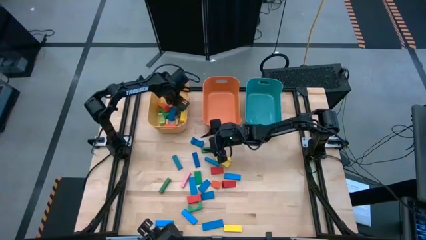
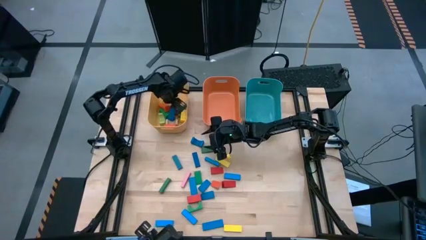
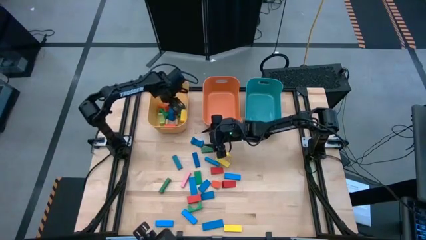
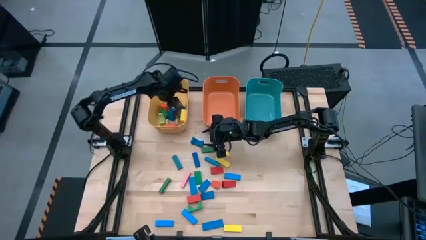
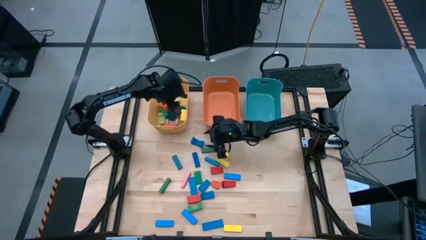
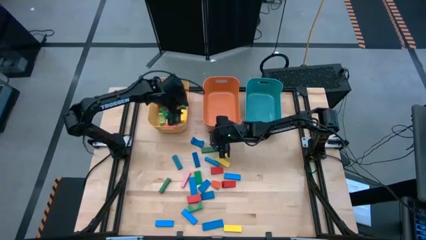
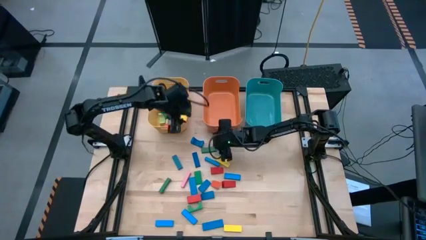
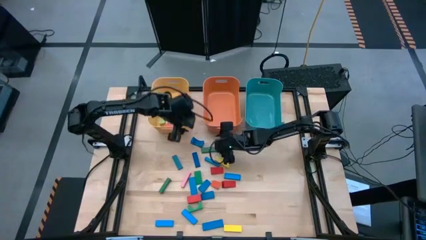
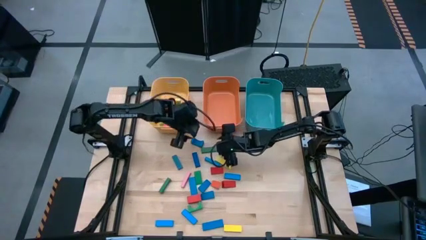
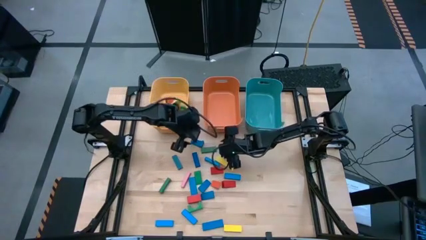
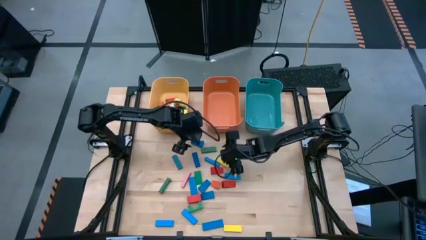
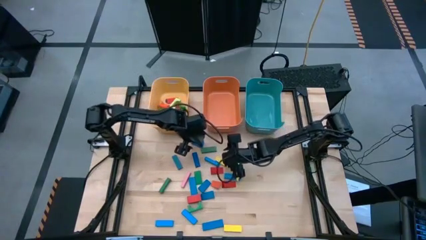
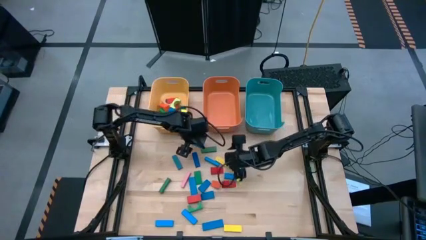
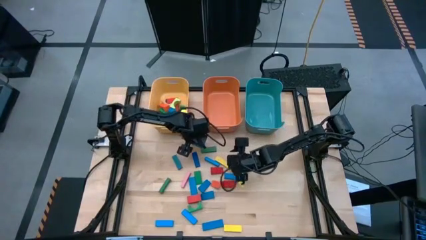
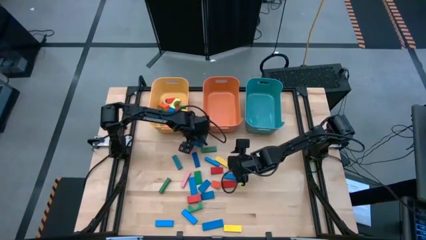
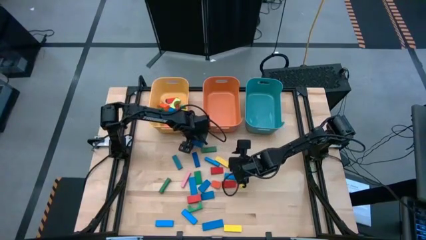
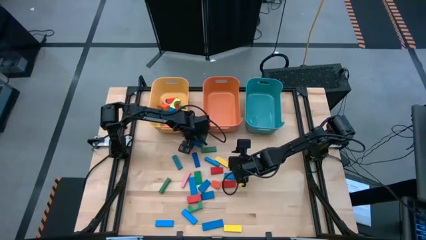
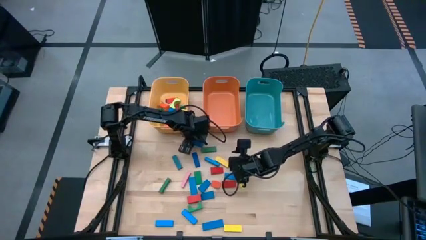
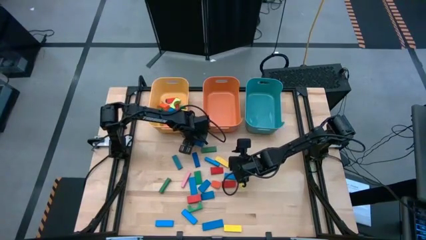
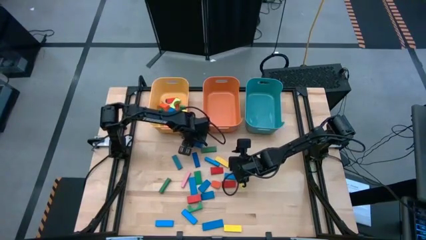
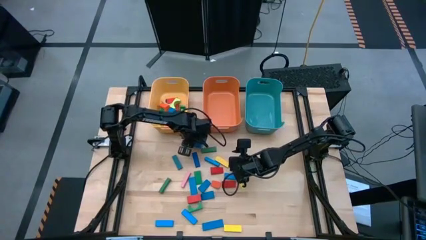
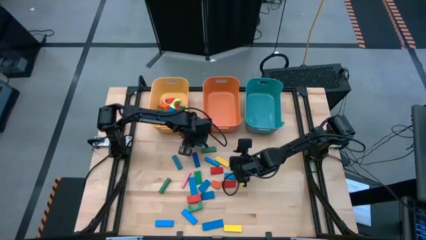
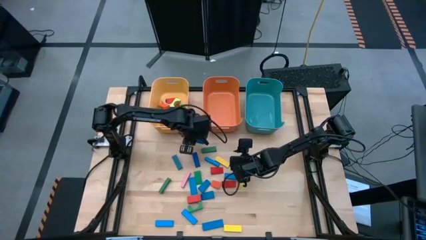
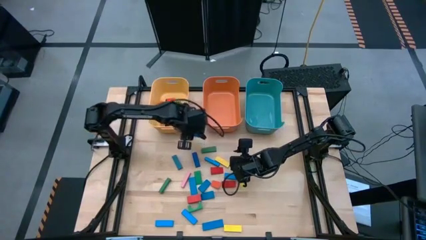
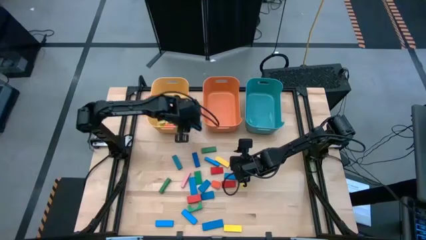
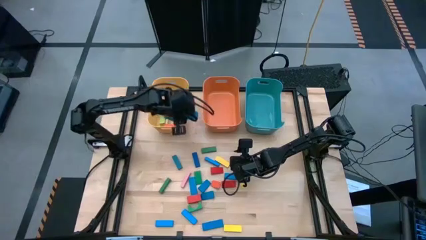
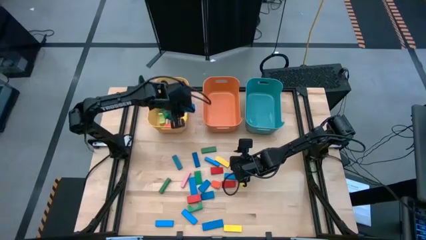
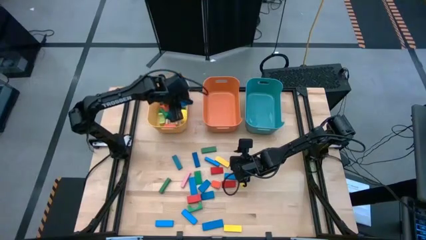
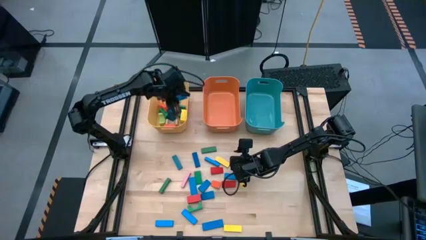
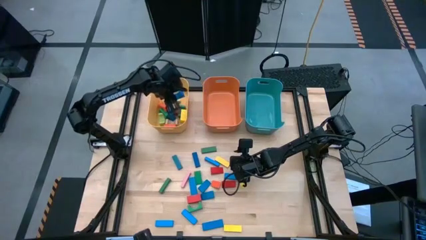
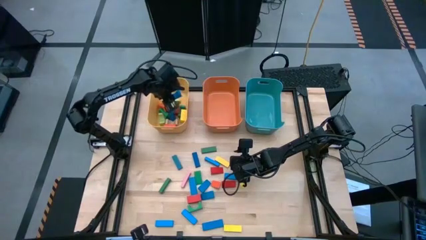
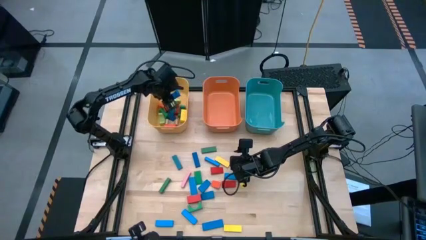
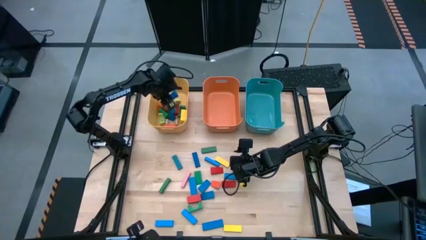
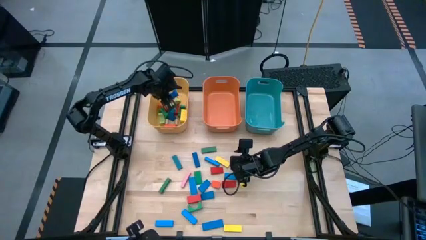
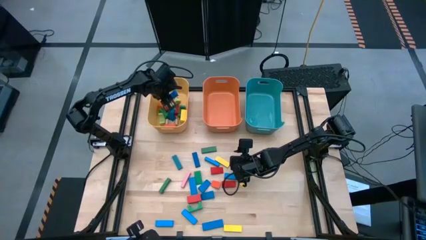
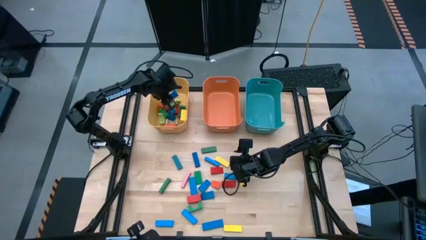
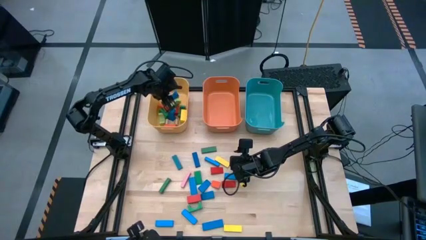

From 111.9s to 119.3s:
Task: Sort blocks by size
Put the blue arch block into the yellow bin

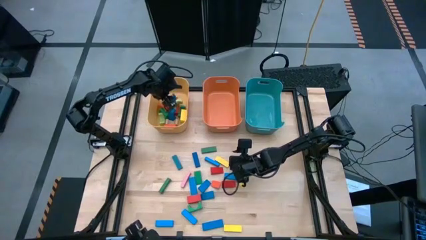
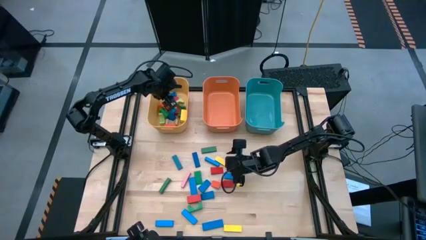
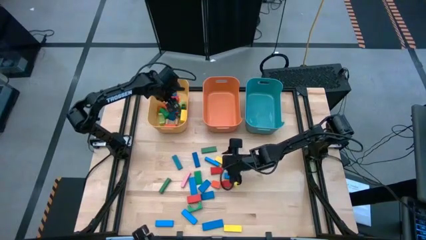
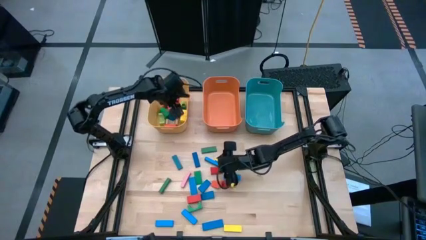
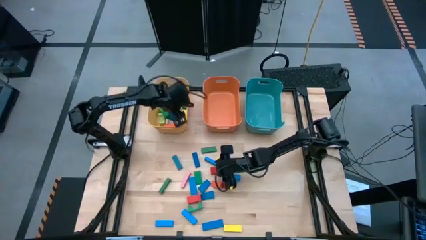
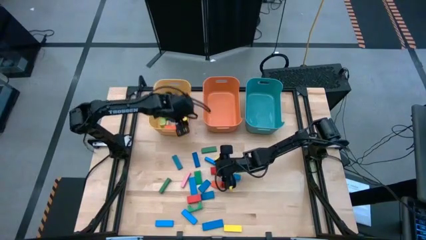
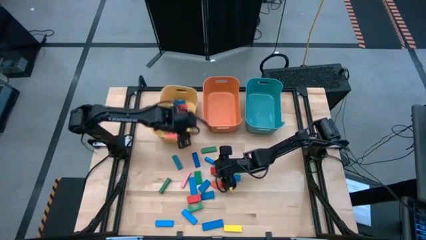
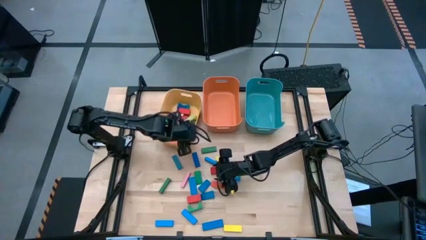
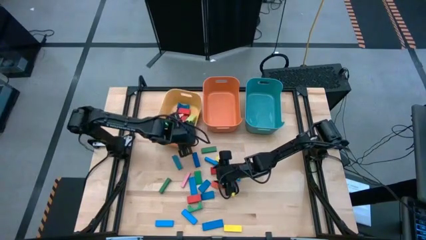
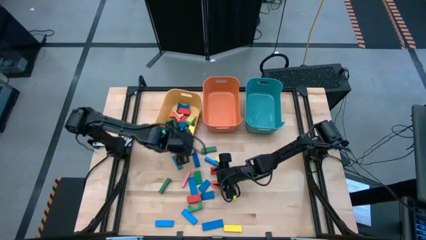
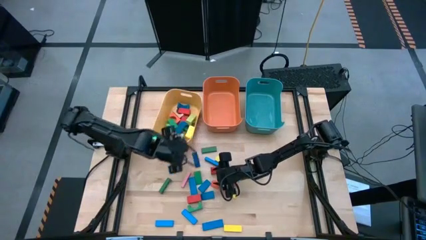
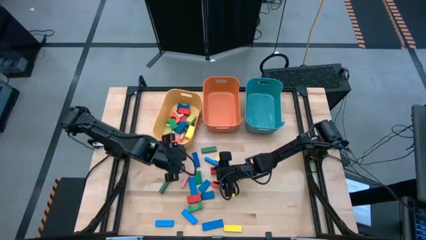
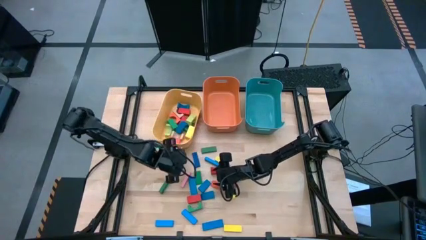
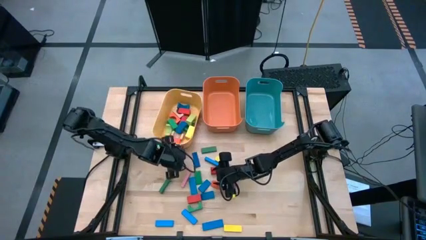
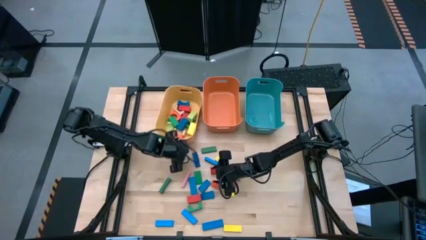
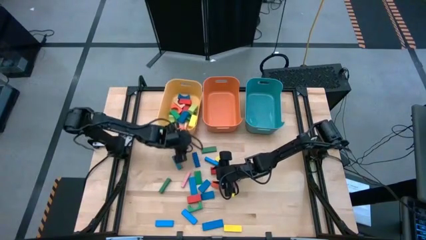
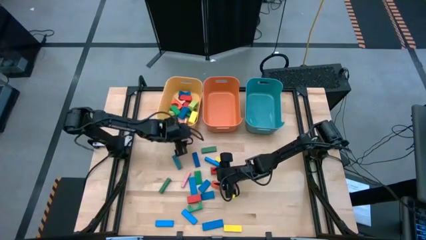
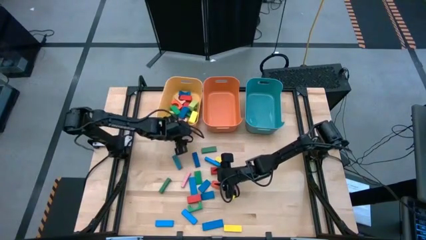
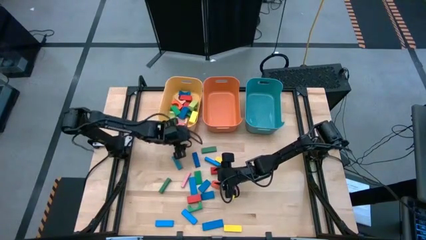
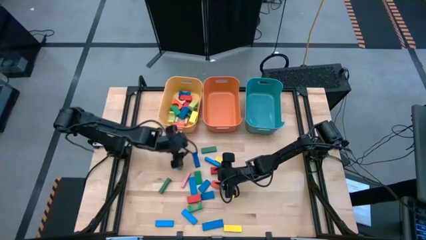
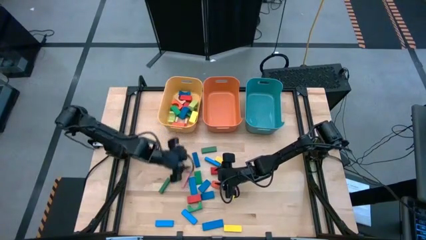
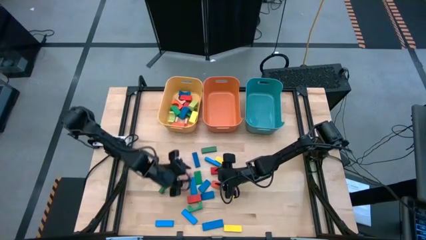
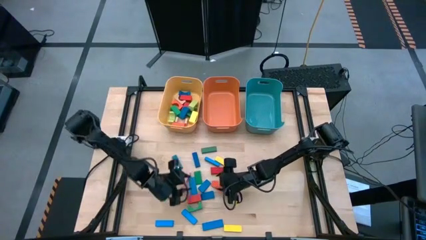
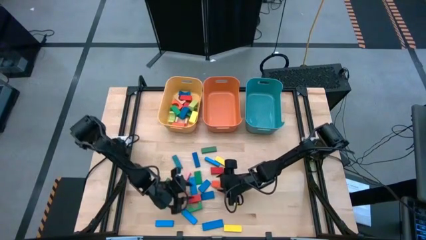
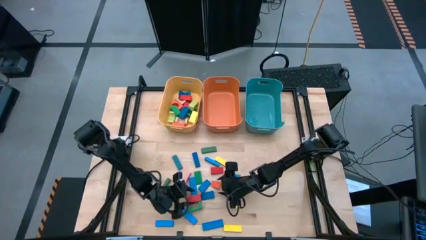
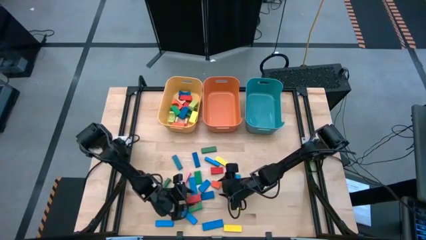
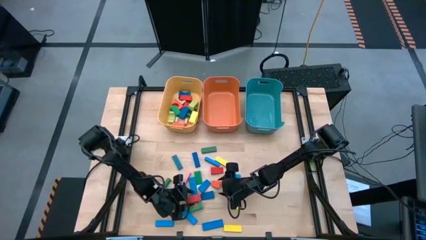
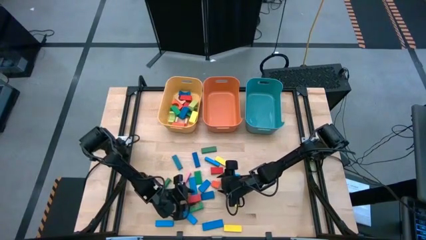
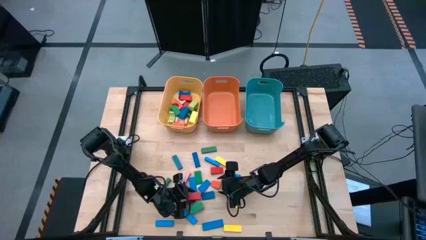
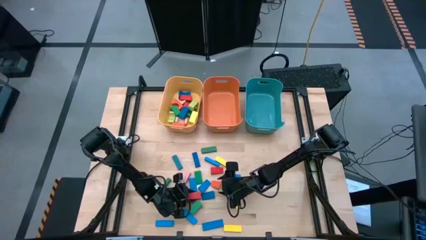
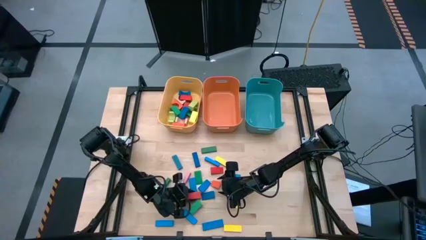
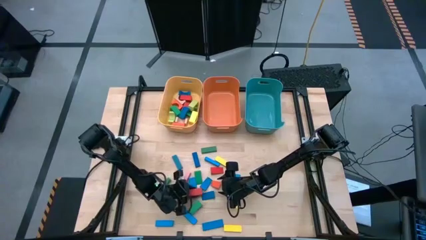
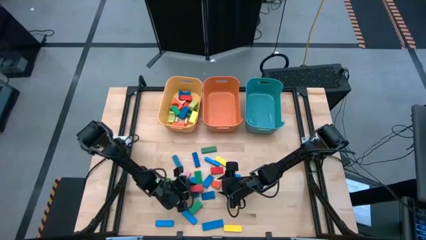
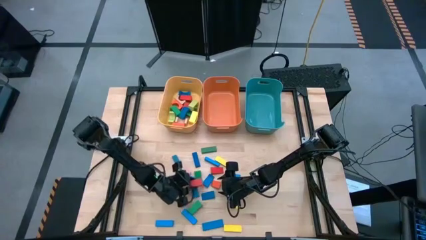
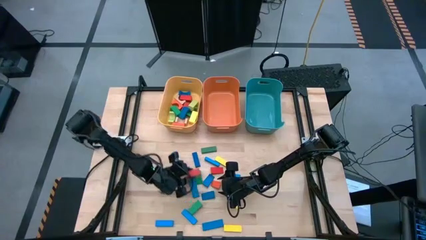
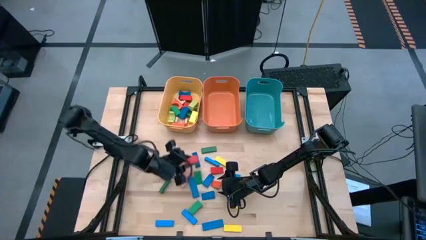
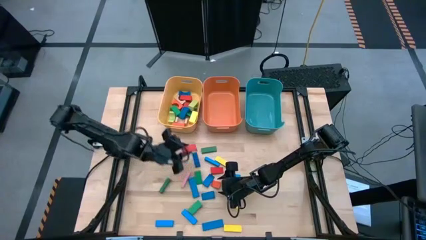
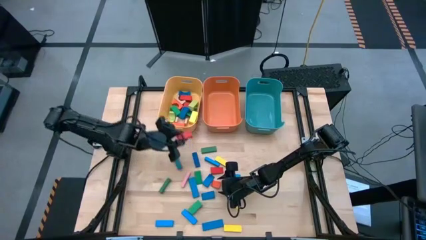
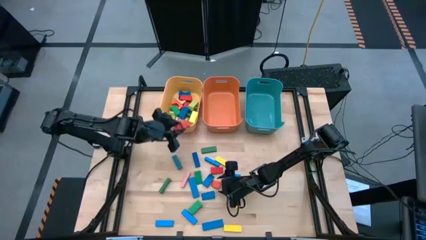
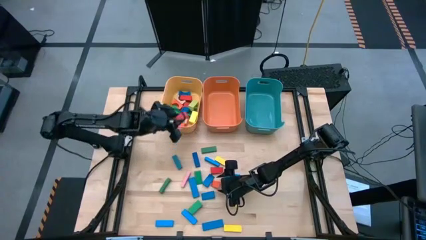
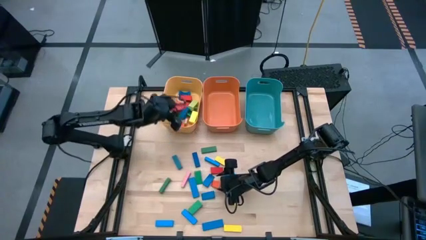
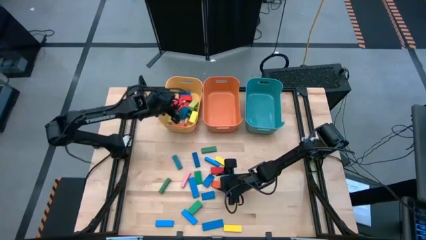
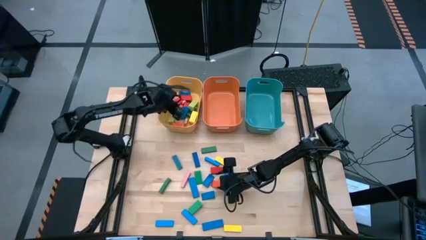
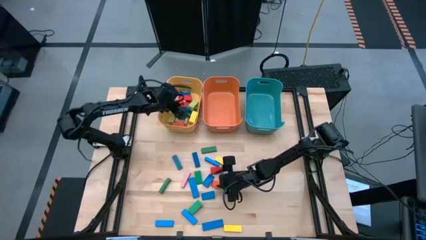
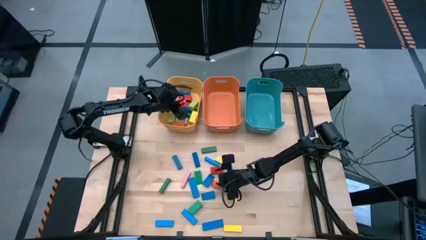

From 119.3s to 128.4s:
Put the red arch block into the yellow bin
